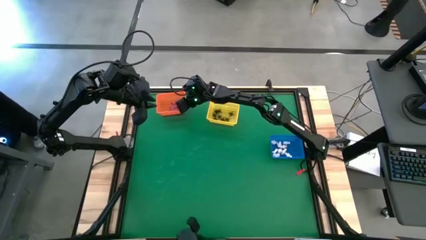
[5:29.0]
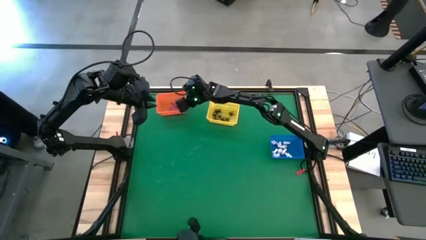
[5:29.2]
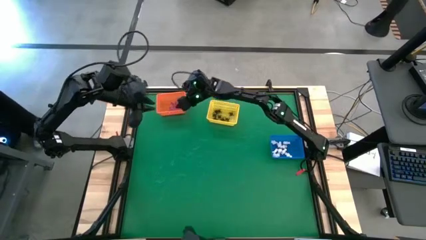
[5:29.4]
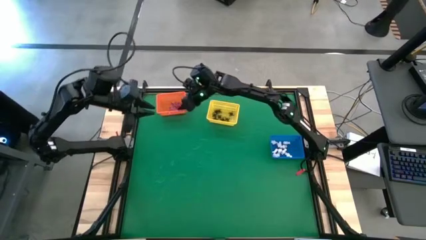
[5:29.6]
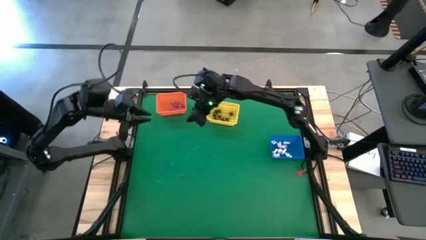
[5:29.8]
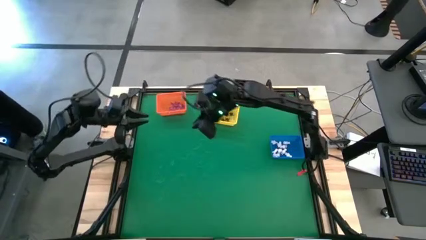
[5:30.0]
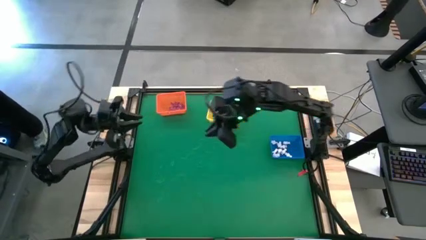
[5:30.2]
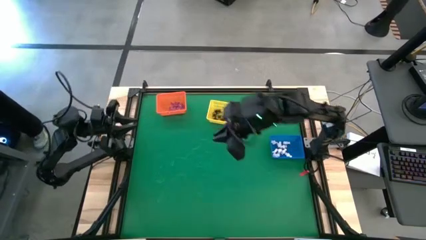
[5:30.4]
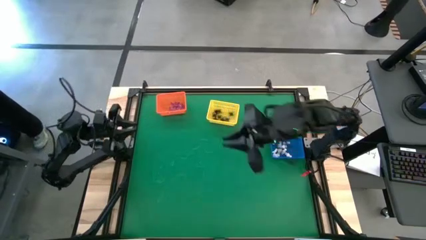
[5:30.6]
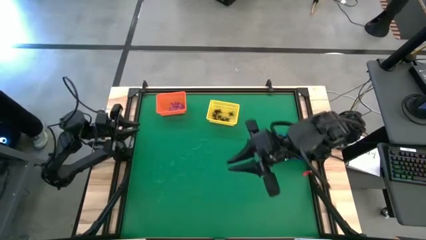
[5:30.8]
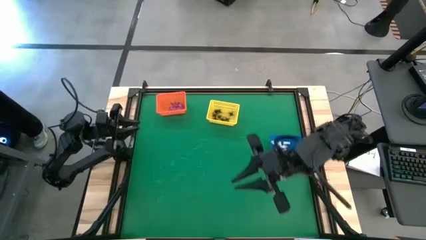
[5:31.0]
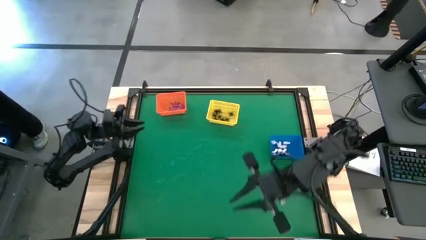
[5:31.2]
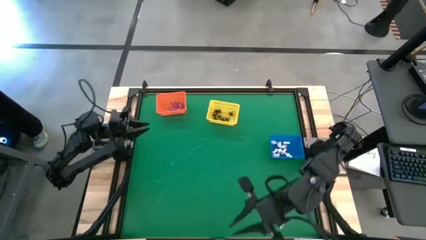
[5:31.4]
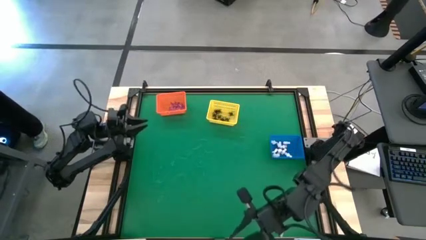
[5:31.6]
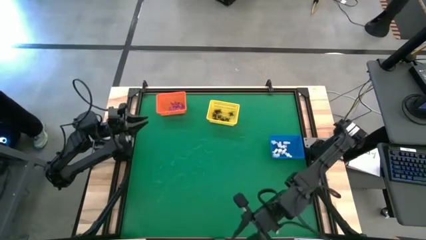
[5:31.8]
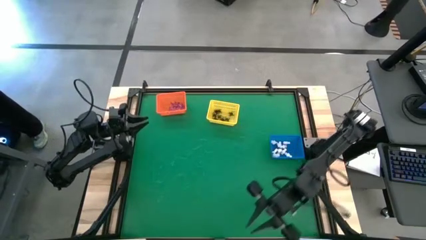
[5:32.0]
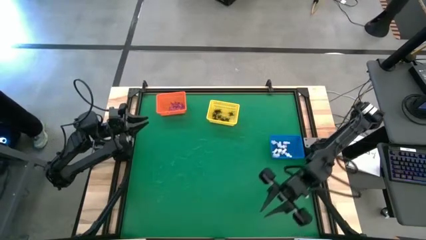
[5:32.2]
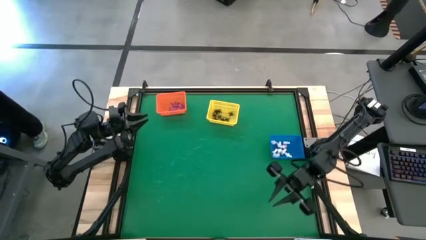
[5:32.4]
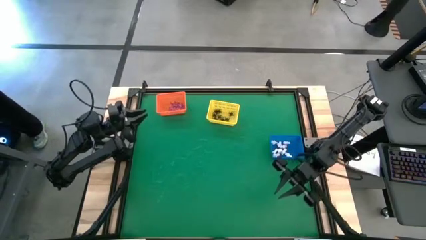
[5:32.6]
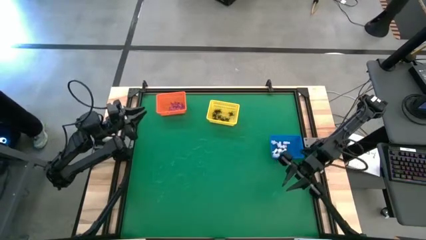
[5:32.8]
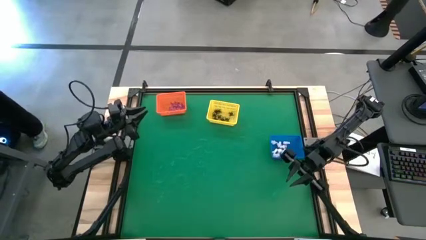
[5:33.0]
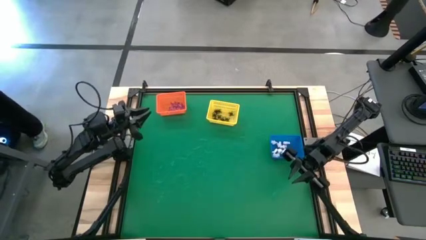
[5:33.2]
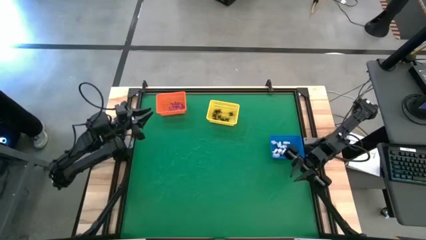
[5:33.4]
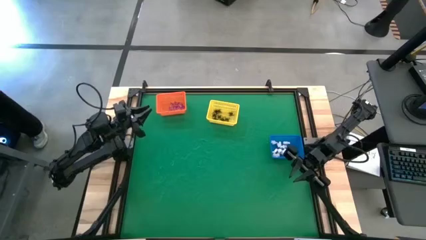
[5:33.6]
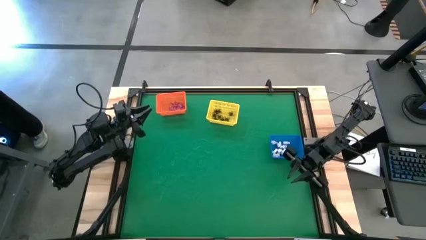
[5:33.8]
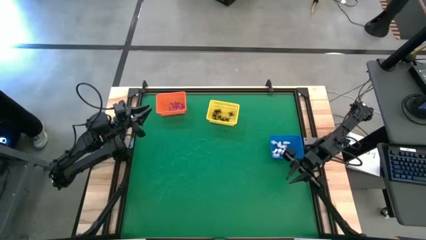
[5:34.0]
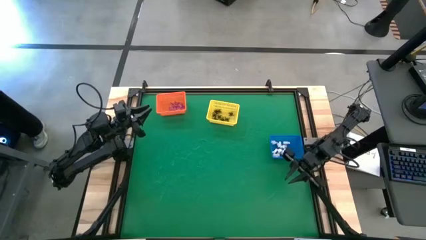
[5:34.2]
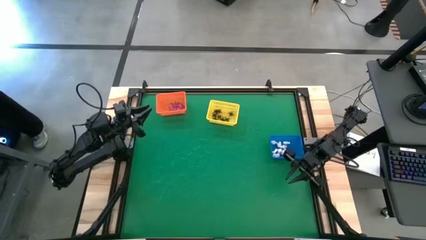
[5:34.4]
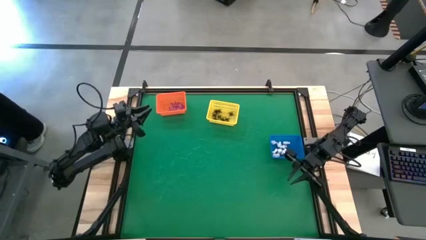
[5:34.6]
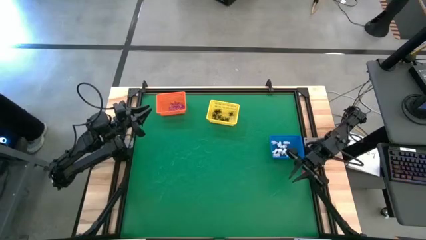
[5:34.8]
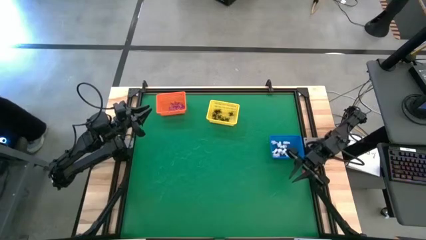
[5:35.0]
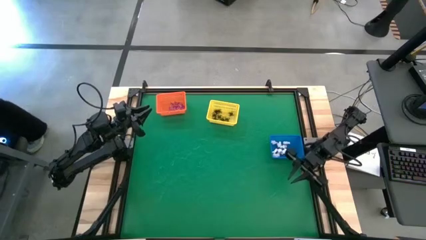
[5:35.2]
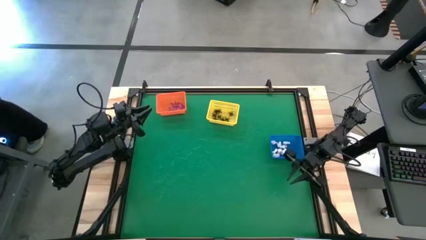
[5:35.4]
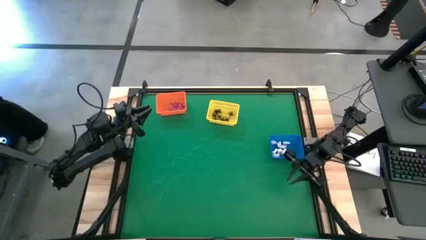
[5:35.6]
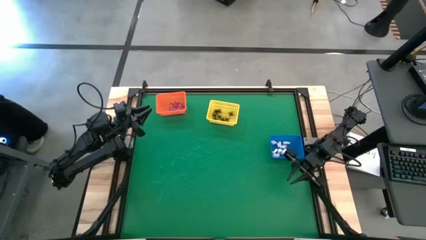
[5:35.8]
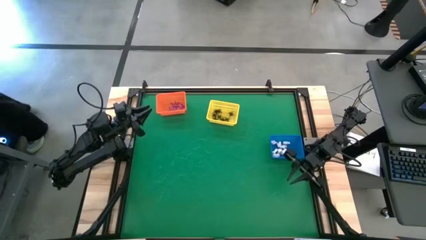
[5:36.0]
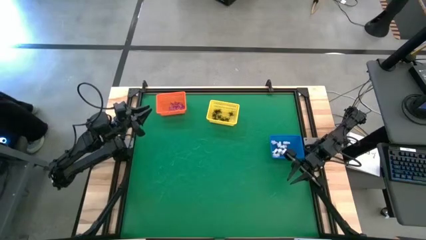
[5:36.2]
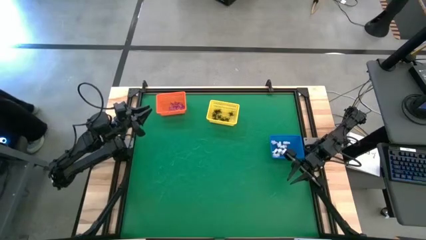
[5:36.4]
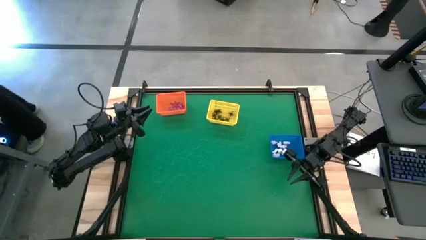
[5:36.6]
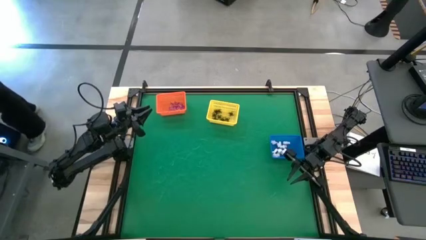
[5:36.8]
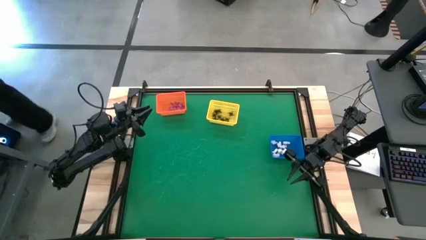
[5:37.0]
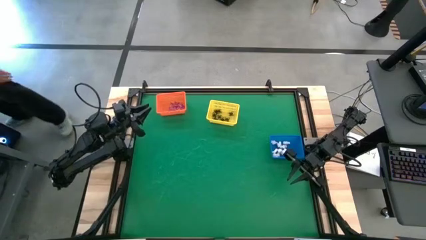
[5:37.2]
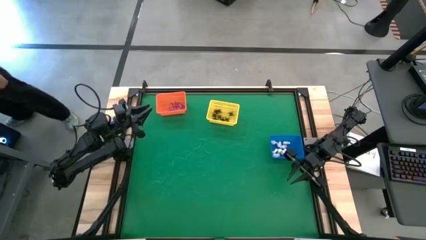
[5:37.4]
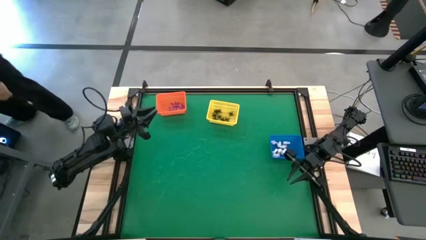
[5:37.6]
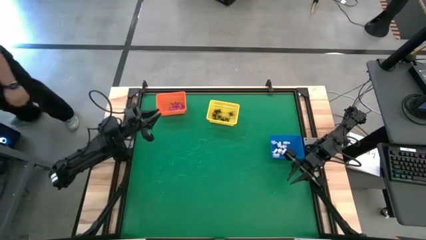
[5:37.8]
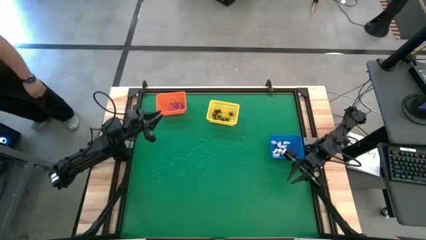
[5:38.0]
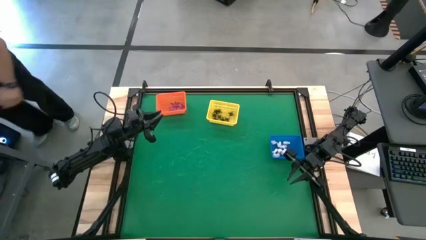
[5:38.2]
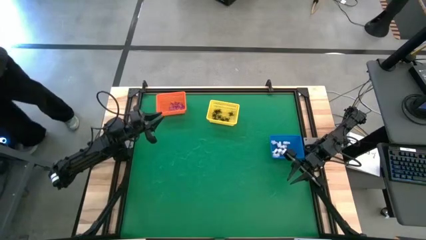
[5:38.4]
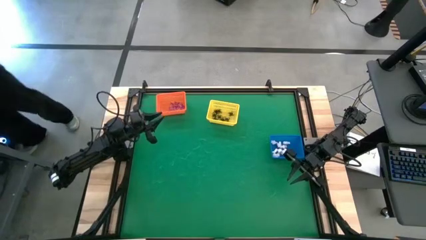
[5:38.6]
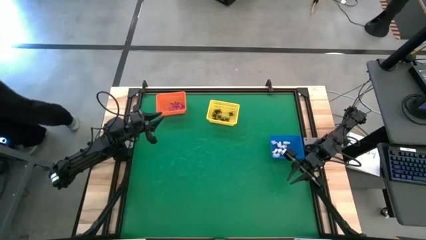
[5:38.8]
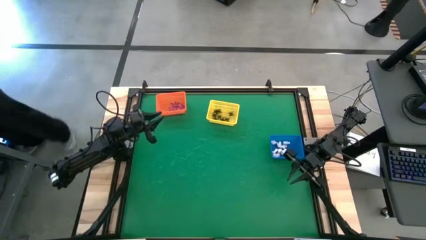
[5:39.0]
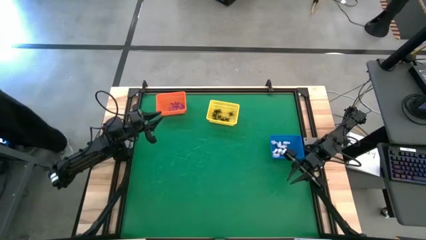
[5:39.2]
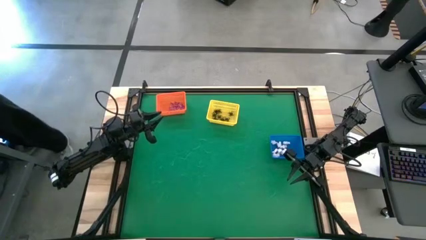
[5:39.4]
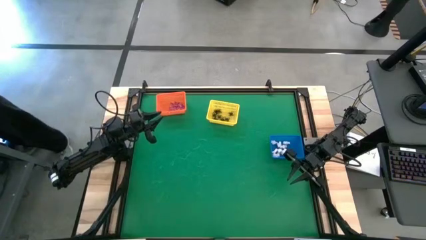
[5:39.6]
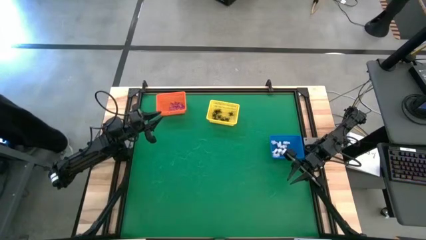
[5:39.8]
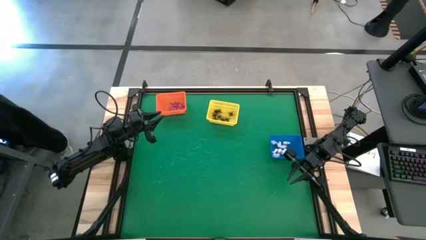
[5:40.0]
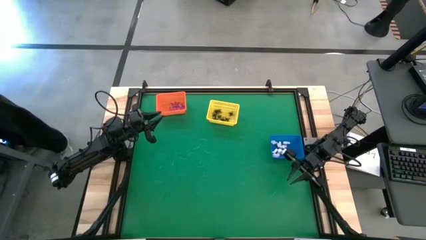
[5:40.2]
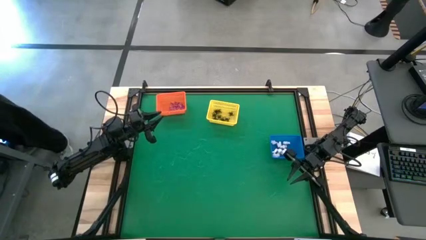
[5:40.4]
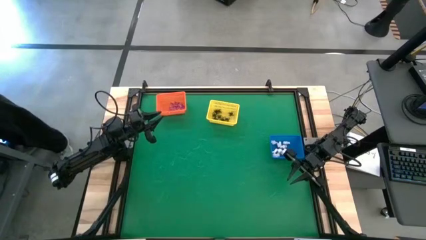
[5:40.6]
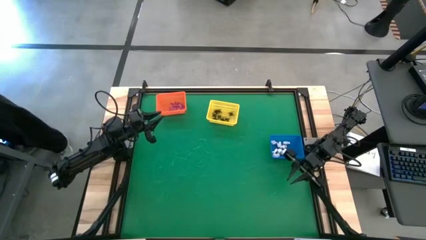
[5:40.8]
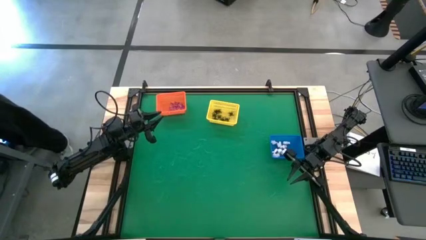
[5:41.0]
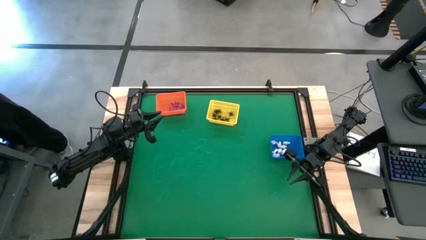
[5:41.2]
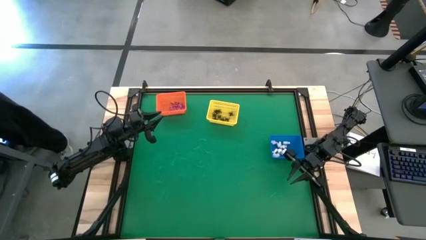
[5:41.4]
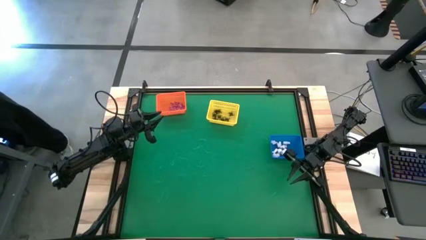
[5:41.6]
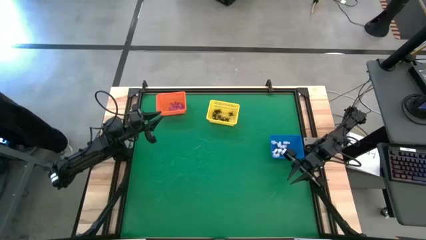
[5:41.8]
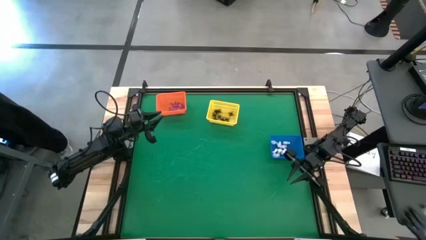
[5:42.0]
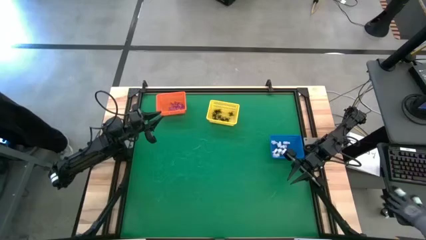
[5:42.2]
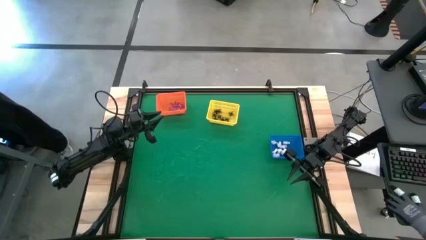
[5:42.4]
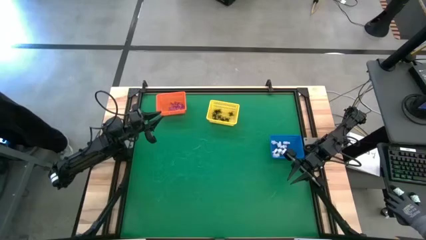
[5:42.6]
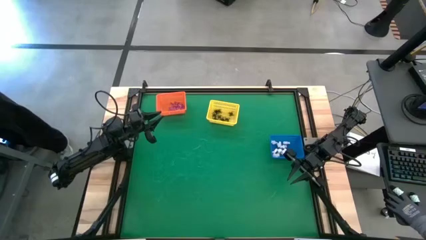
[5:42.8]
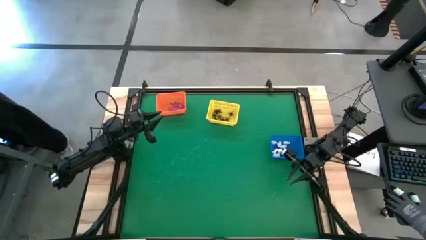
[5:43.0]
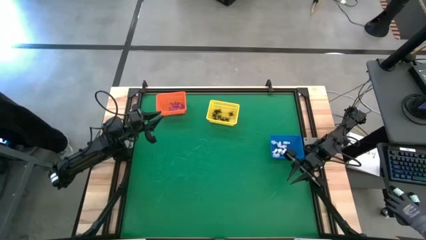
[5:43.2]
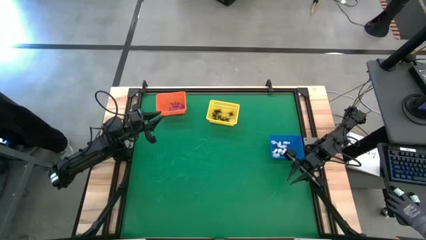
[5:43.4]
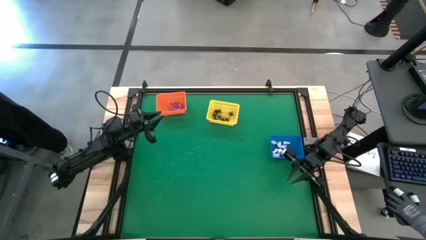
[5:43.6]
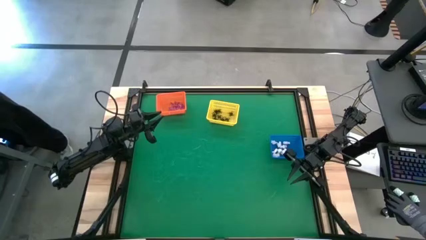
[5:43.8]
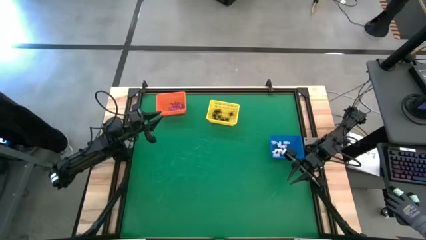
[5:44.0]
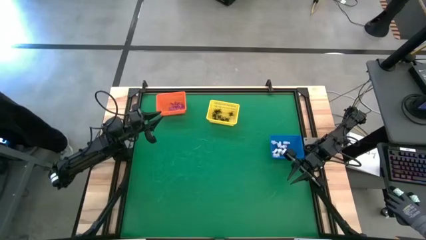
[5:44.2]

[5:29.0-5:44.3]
Task: Sort Halloween decoration
Return to Home Position

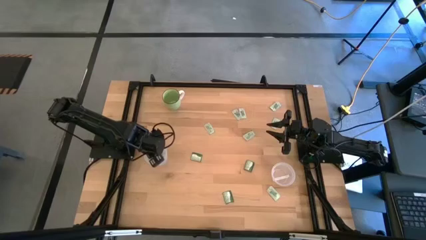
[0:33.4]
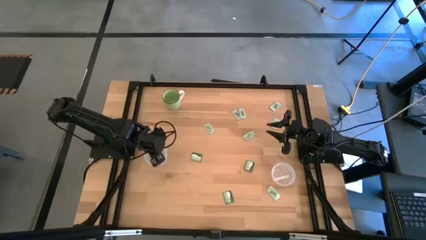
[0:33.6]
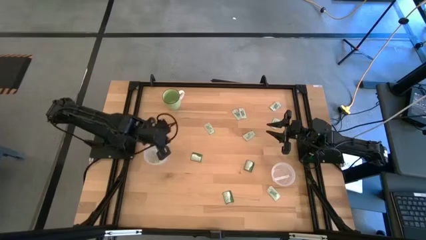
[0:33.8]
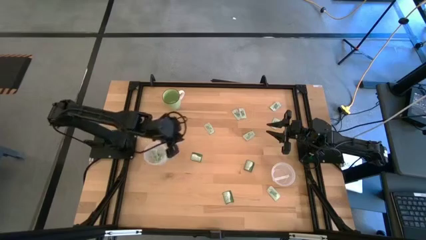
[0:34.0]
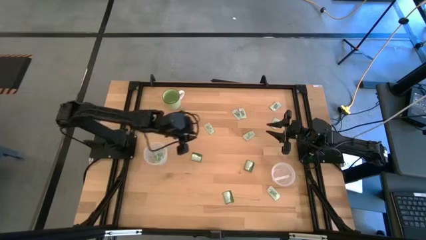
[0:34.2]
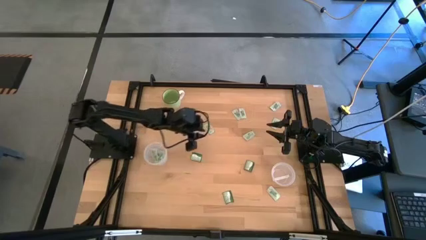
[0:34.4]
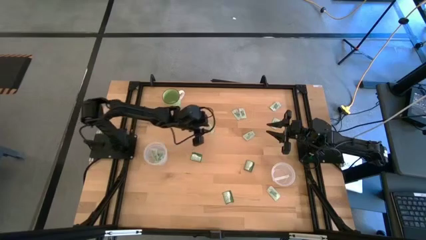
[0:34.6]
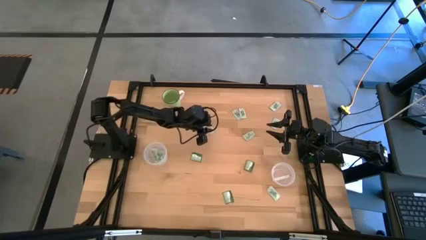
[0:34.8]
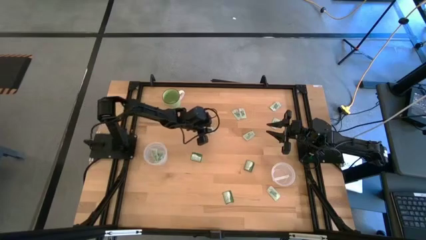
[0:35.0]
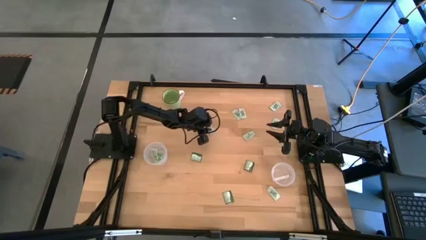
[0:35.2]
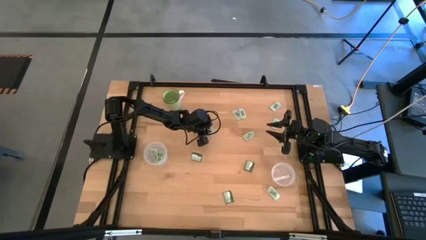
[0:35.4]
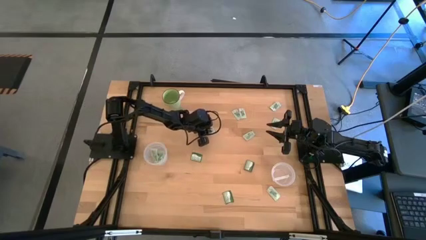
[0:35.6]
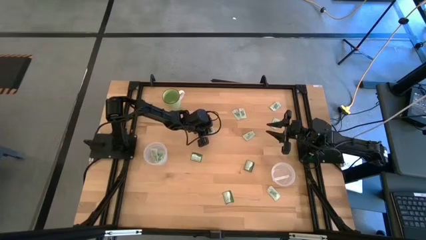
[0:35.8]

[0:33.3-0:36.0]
Task: Pick and place items into bin
Put the stevia packet into the left transparent bin
